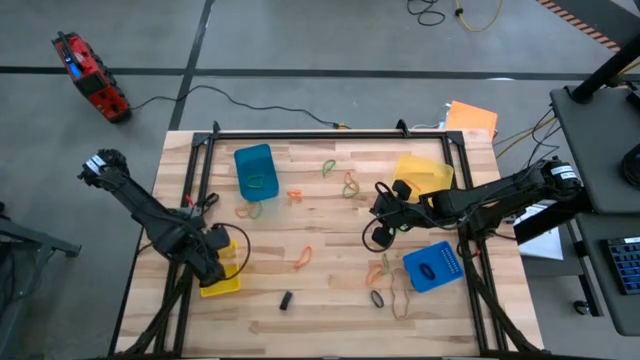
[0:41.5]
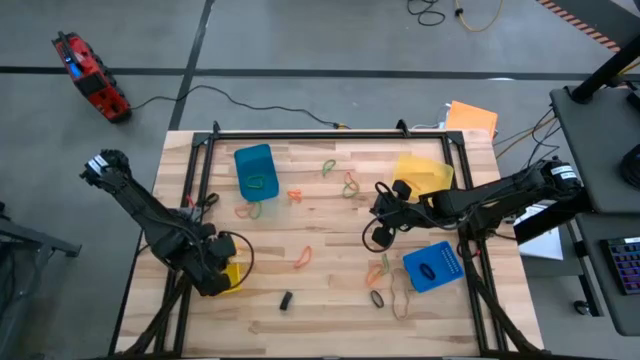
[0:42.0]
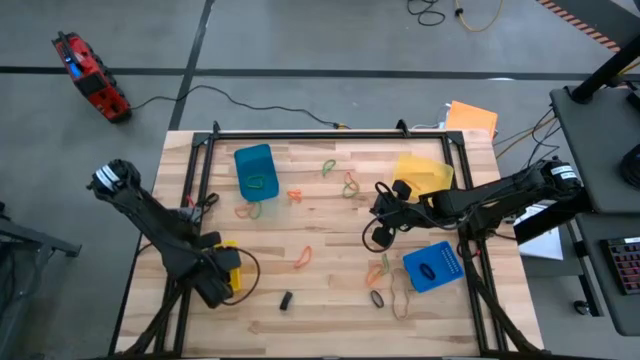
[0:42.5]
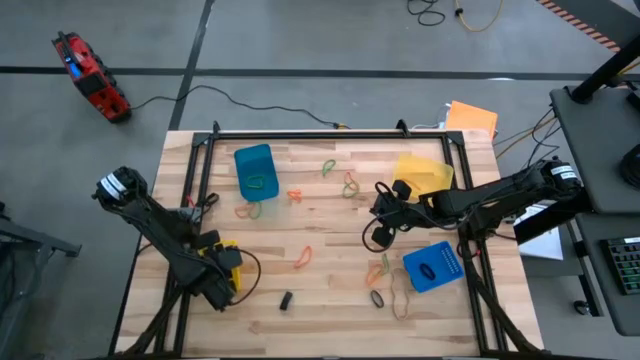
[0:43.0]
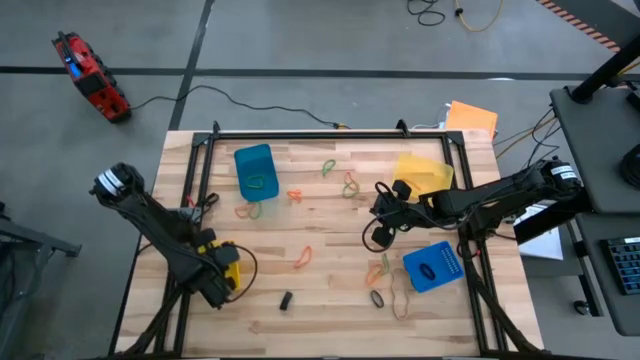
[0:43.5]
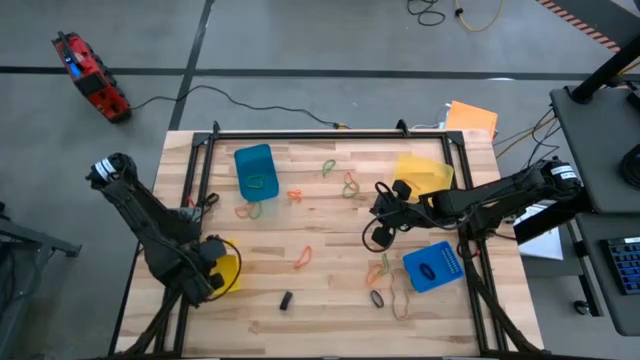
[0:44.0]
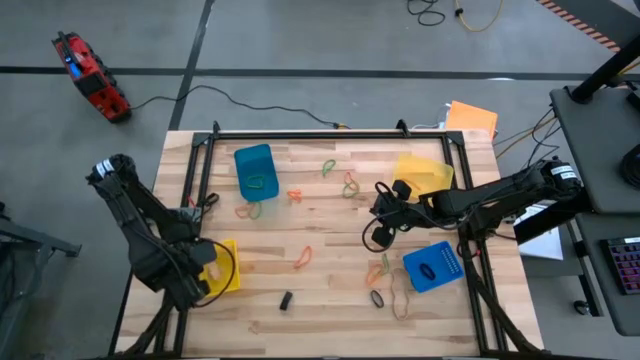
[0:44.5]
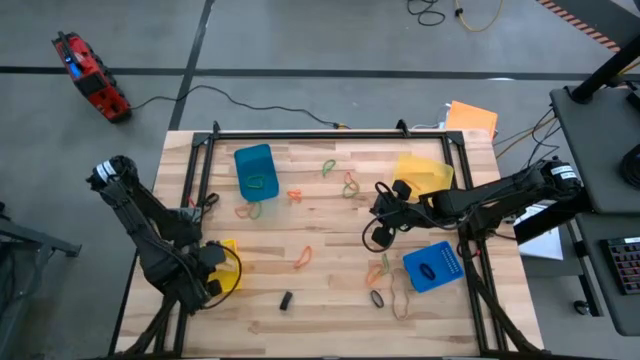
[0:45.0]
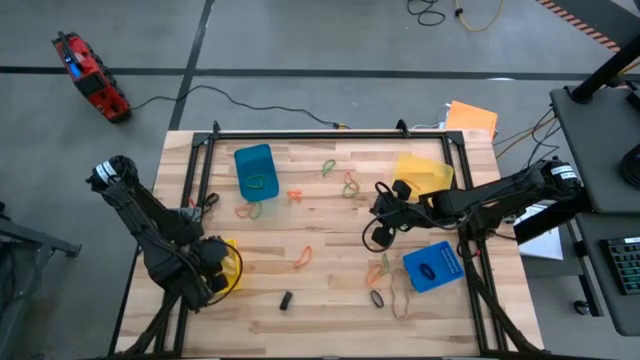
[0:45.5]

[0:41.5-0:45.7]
Task: Sort rubber bands into baskets
Put the brown rubber band into the bottom yellow bin

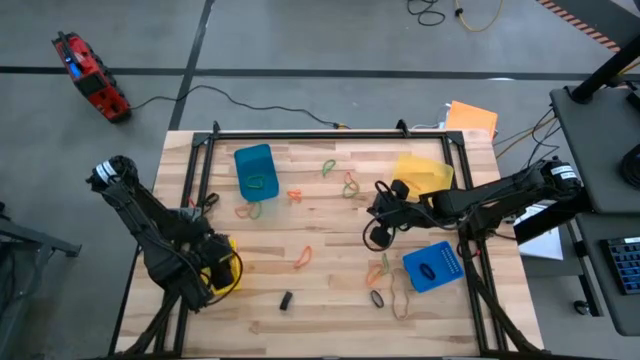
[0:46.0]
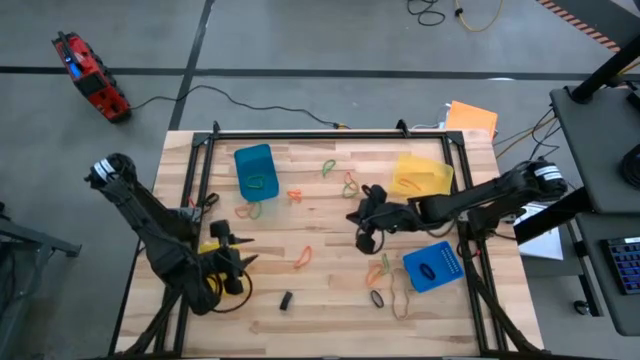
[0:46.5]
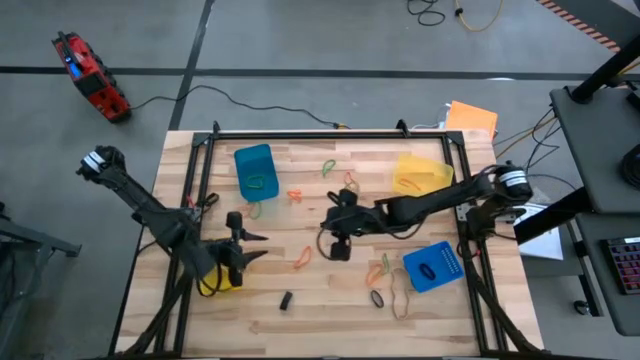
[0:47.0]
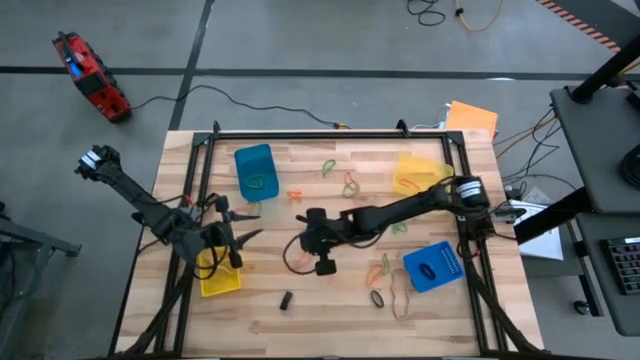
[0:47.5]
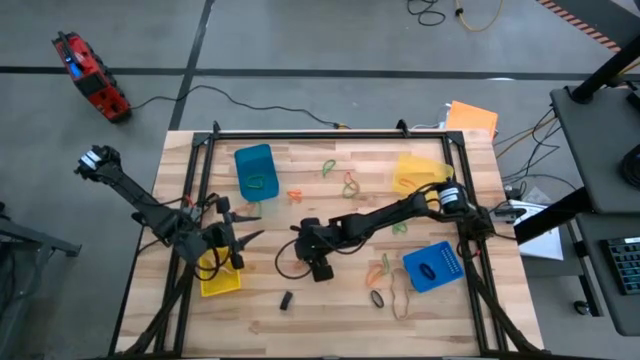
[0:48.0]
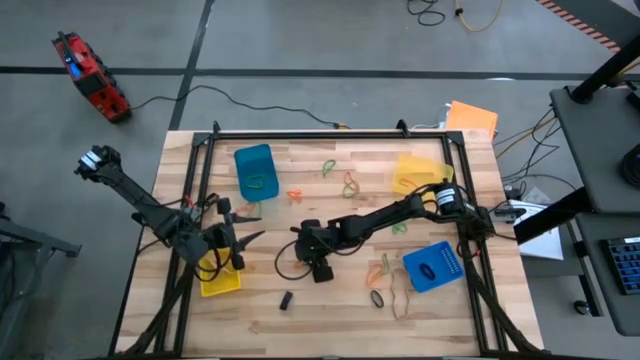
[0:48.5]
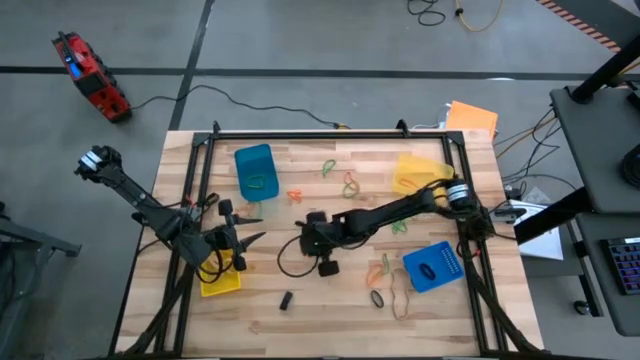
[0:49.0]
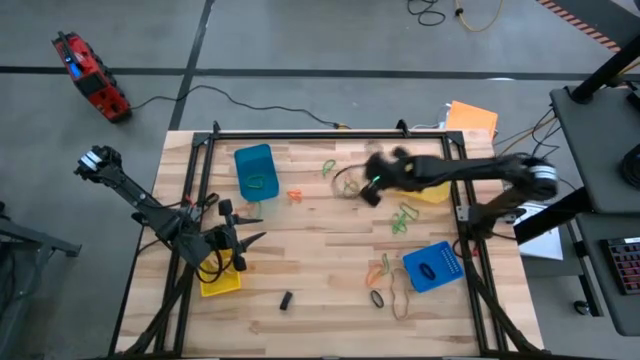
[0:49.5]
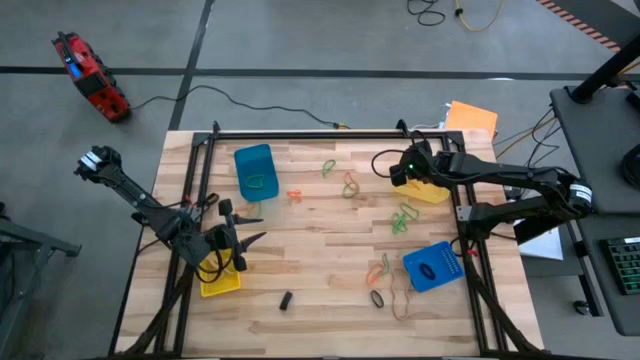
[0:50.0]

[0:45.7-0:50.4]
Put the orange rubber band into the light yellow bin

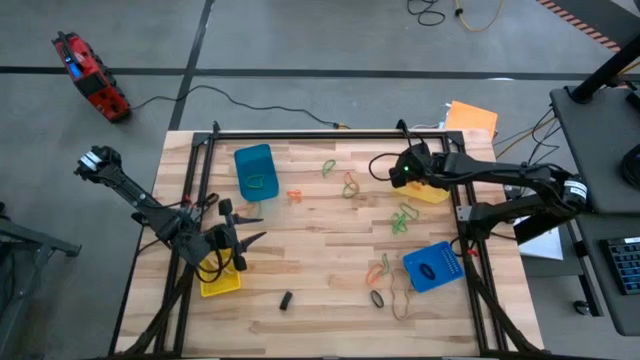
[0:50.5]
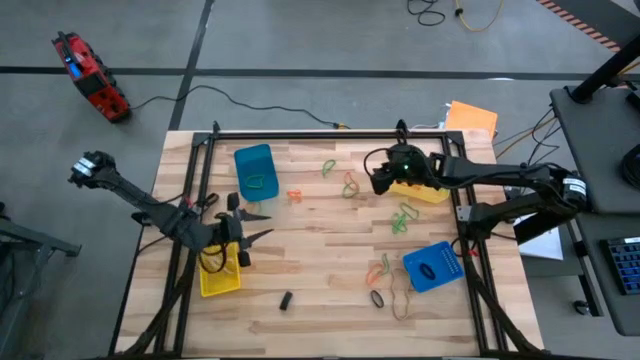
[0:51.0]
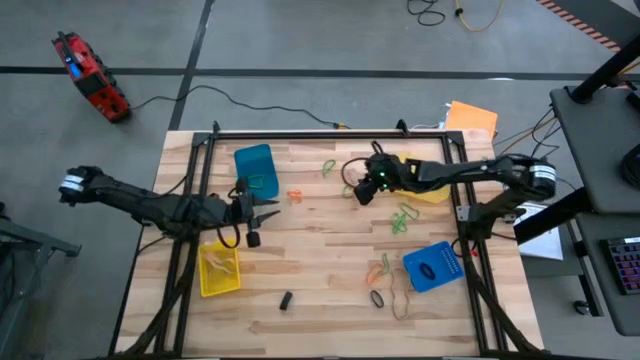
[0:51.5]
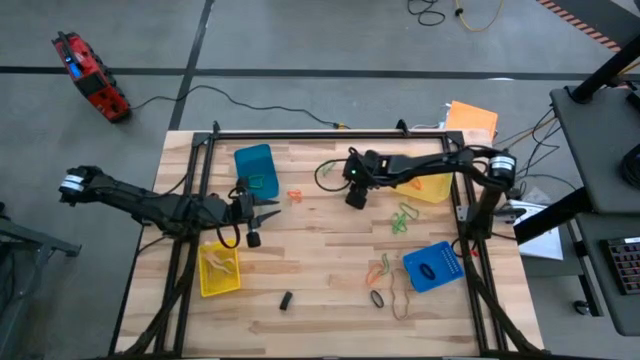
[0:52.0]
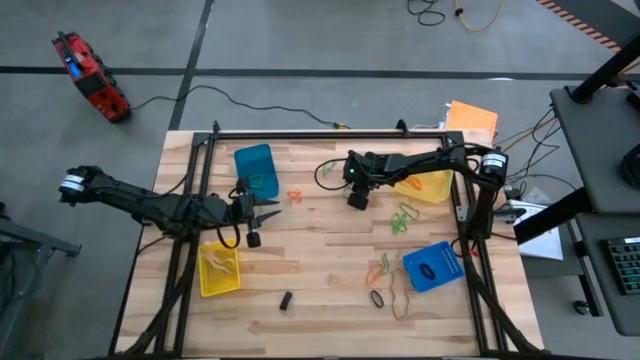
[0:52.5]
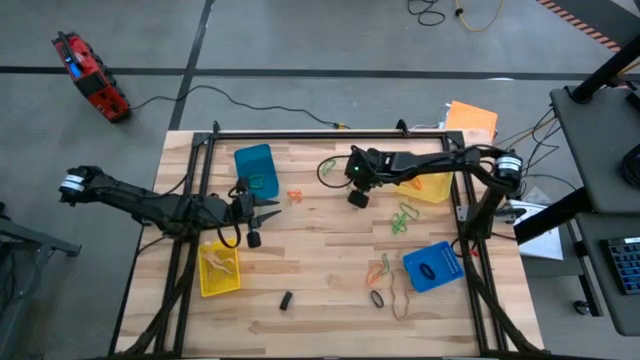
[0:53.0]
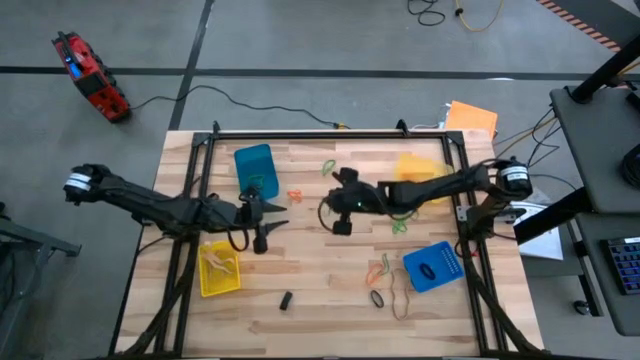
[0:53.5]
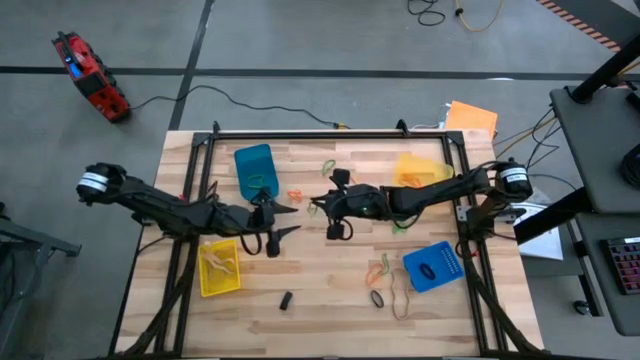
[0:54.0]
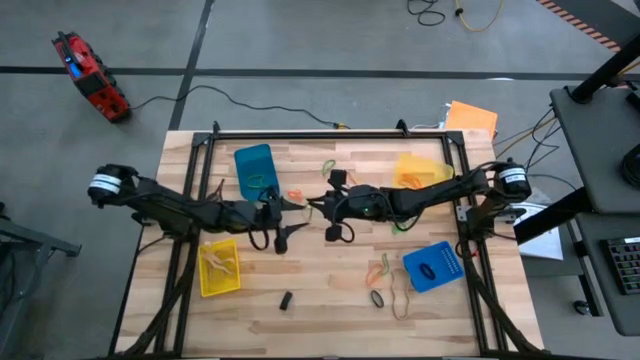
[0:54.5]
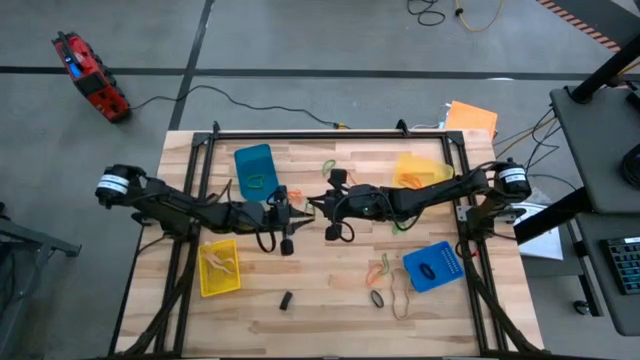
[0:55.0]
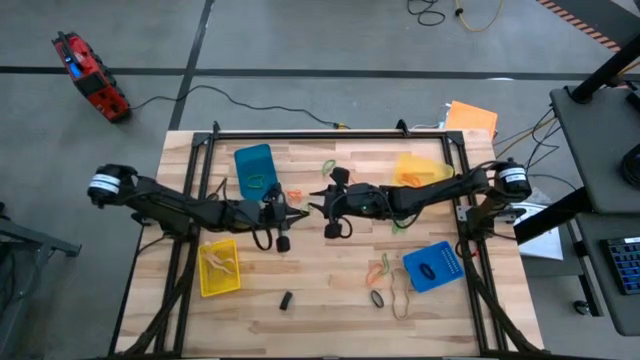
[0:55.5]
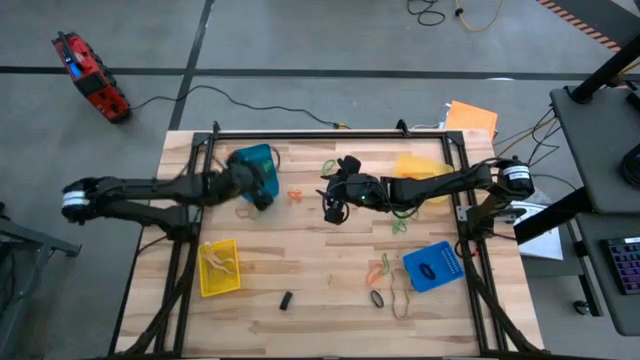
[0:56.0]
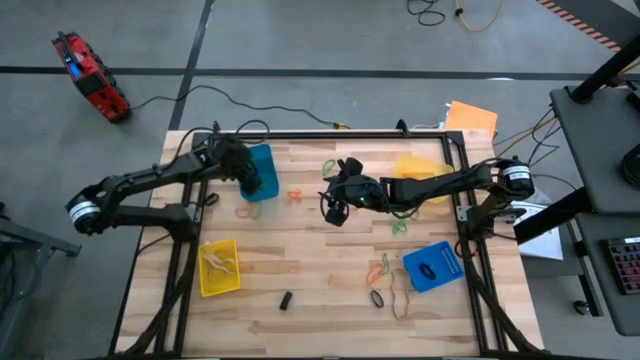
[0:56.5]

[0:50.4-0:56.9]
Put the green rubber band into the light blue bin

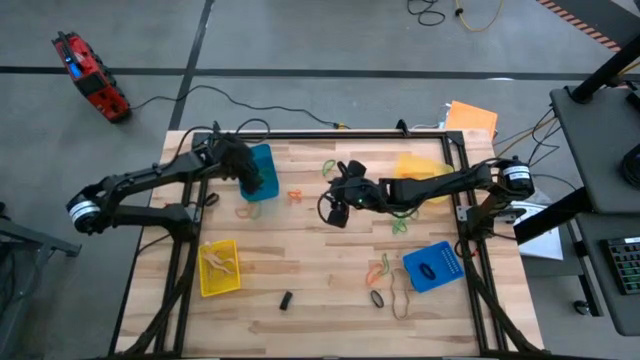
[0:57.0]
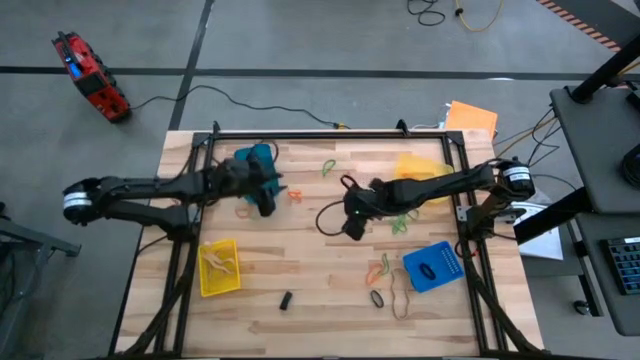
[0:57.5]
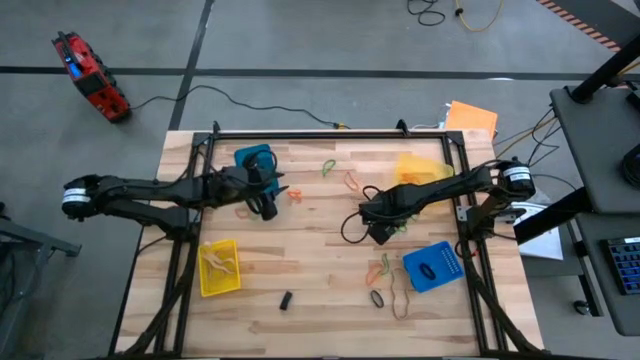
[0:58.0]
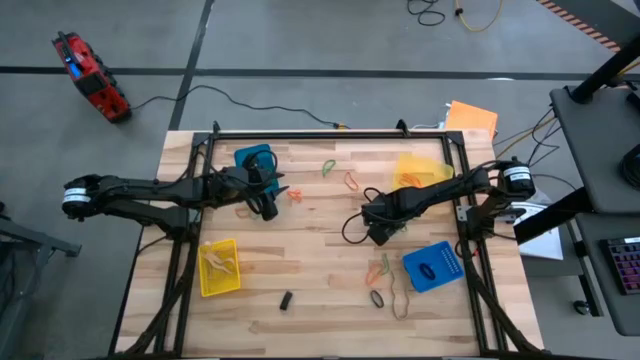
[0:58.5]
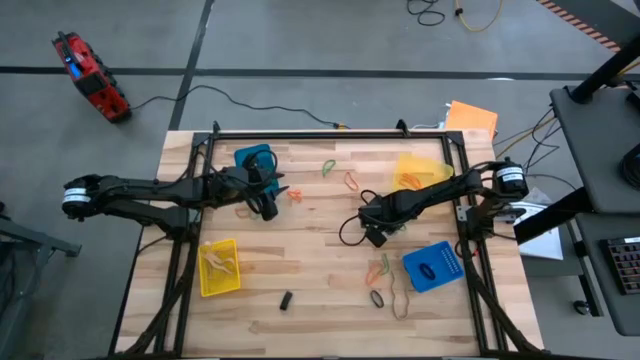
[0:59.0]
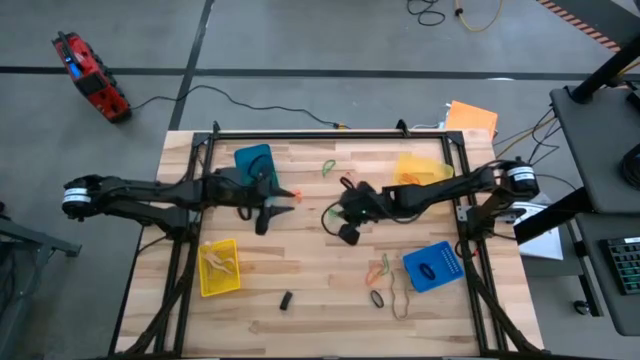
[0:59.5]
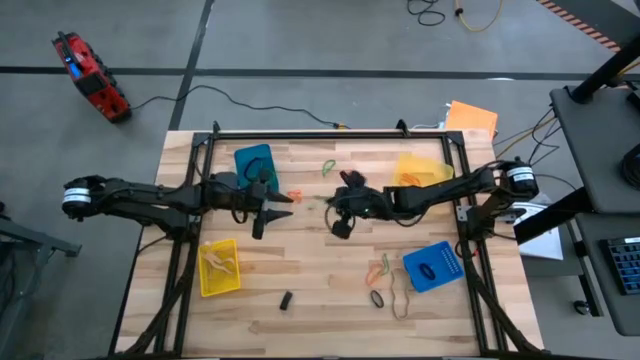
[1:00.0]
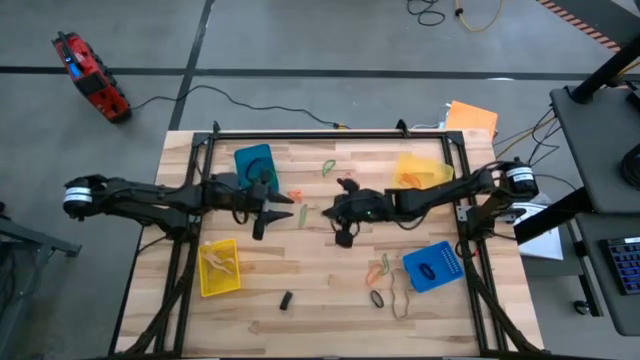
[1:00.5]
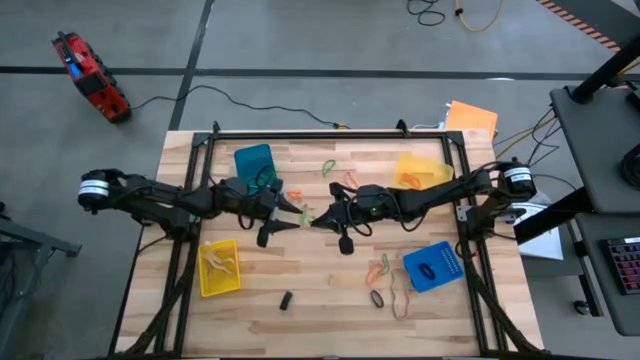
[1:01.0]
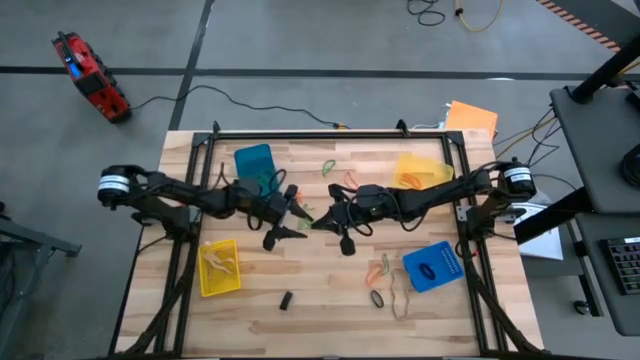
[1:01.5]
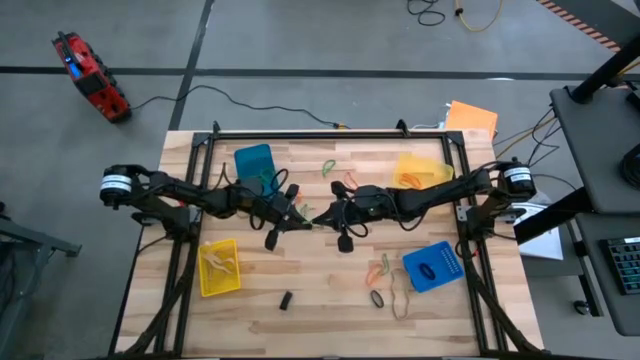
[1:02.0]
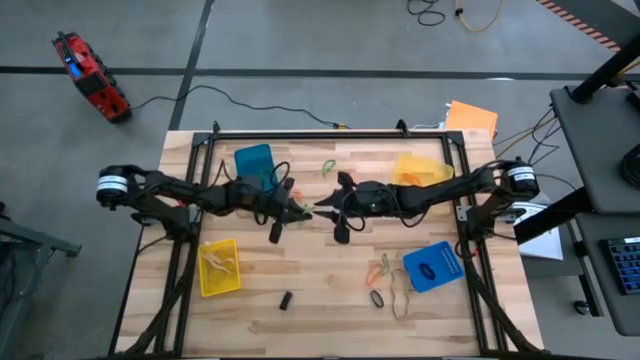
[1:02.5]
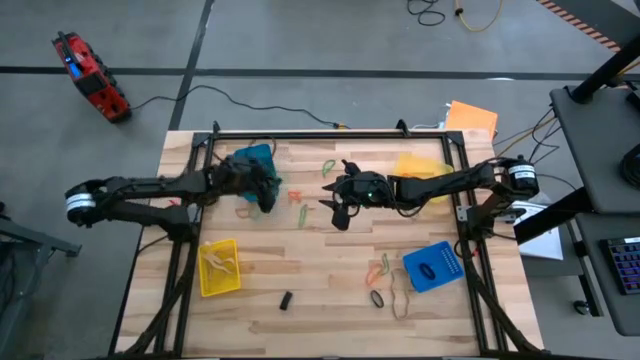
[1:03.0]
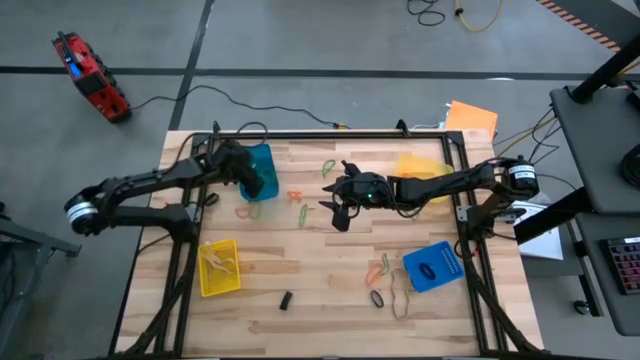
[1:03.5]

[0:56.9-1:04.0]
Put the green rubber band into the light blue bin
